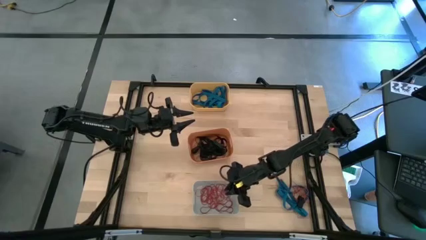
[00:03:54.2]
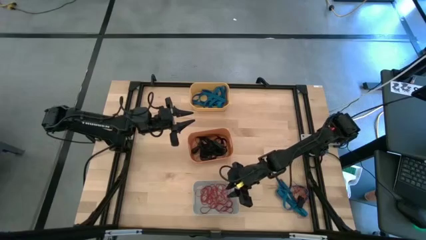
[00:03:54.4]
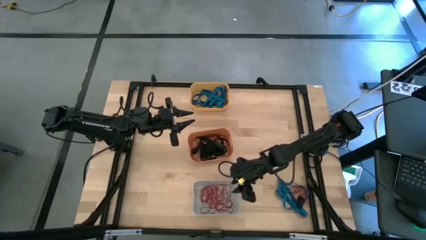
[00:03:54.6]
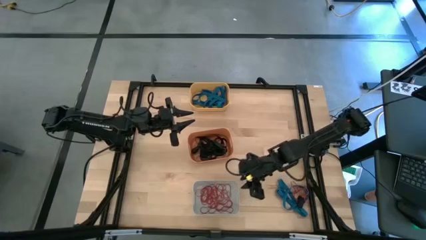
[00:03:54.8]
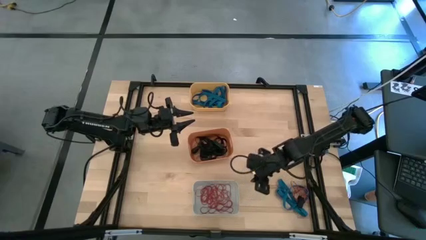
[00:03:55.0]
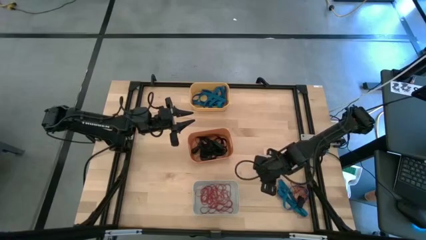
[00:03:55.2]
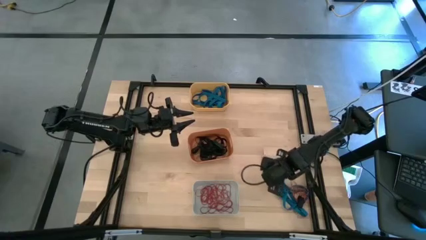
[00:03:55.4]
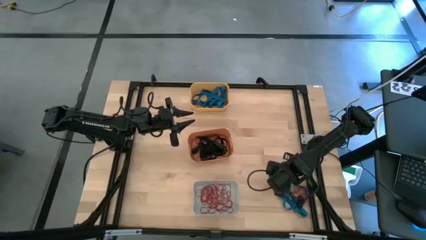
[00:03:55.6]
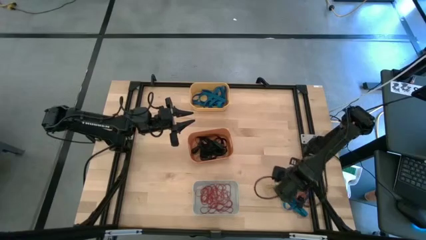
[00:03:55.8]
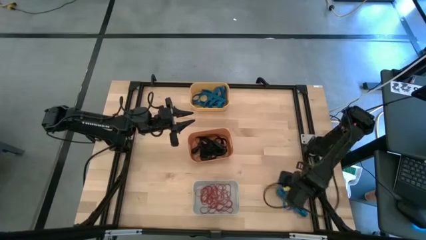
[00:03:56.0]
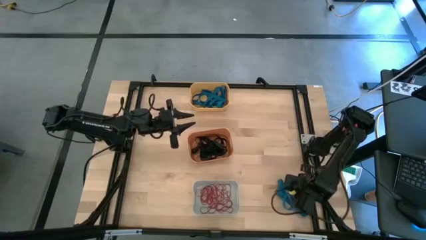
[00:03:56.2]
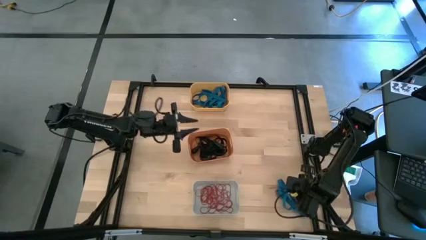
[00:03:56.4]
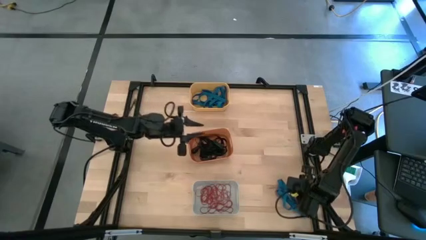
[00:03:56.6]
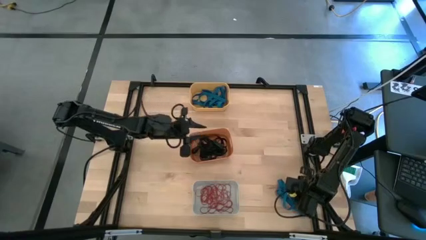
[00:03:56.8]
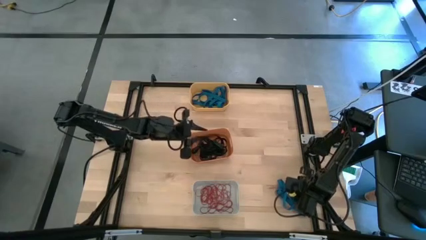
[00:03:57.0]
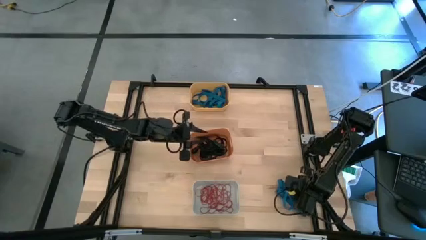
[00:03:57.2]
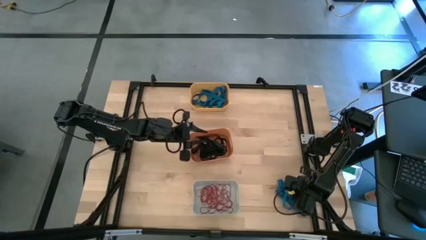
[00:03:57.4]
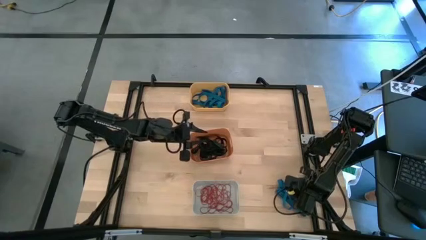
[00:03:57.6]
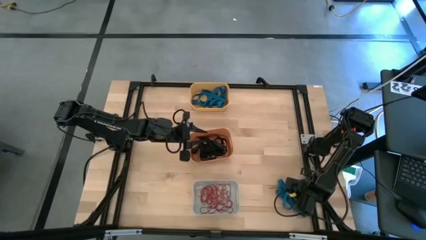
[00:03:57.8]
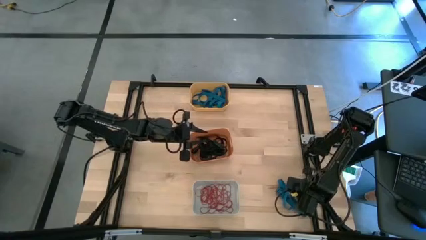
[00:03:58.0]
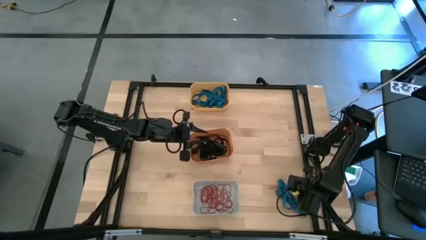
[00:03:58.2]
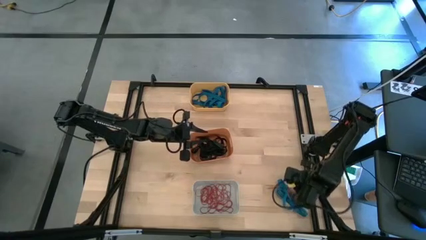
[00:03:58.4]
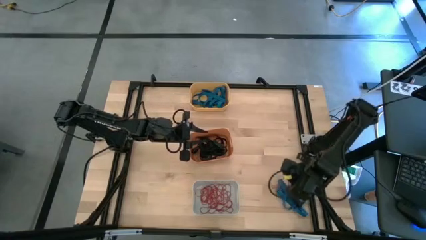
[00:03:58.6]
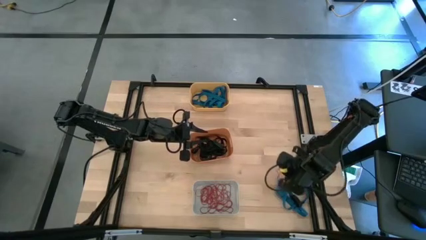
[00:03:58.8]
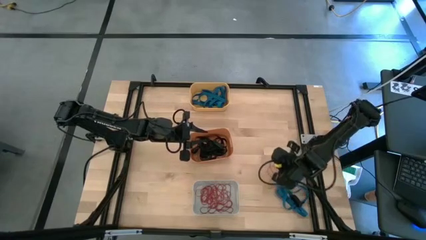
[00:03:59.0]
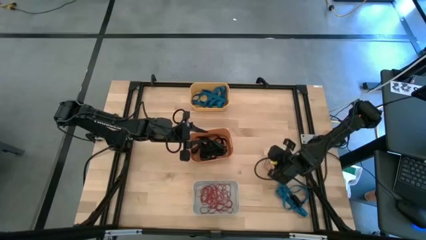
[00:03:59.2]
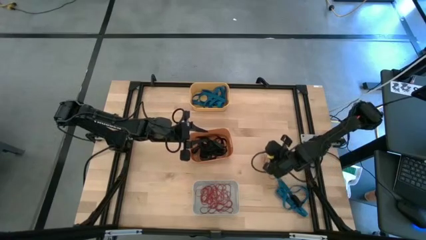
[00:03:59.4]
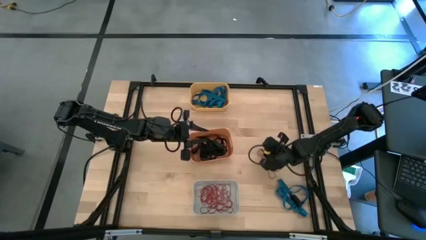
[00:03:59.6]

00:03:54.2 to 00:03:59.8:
Task: Sort rubber bands into baskets
Put the red rubber band in the white bin

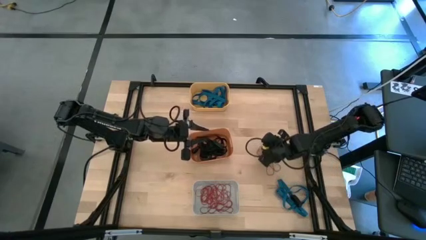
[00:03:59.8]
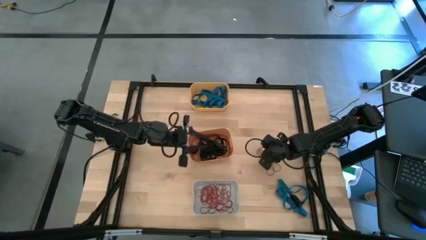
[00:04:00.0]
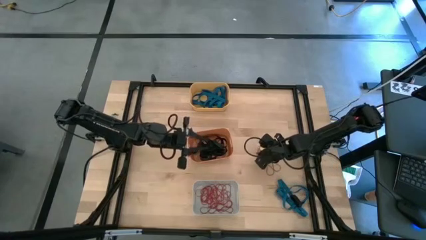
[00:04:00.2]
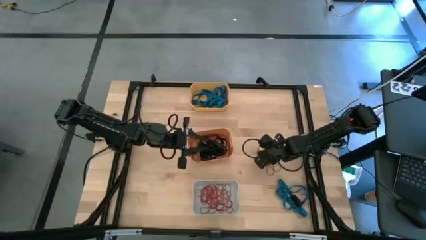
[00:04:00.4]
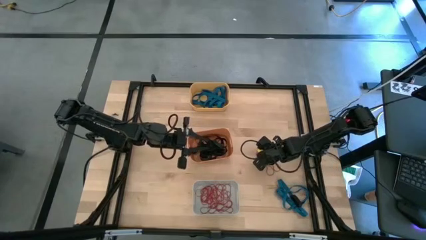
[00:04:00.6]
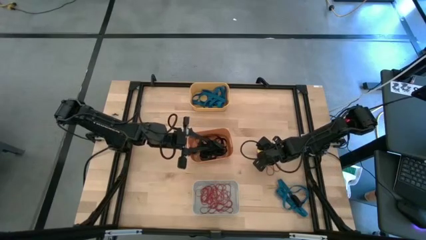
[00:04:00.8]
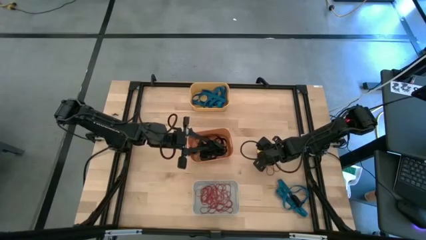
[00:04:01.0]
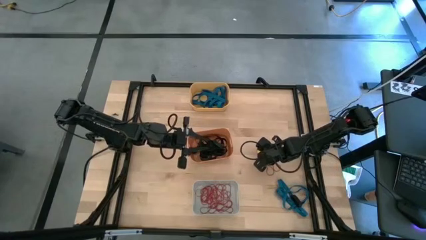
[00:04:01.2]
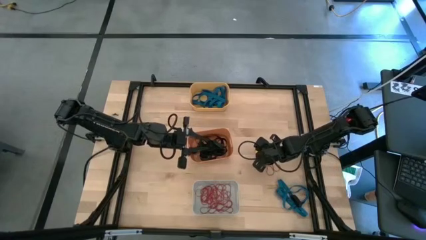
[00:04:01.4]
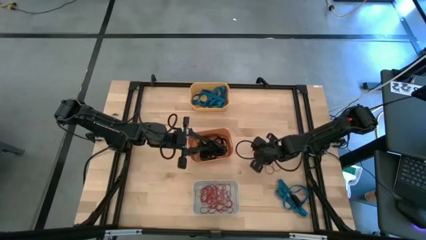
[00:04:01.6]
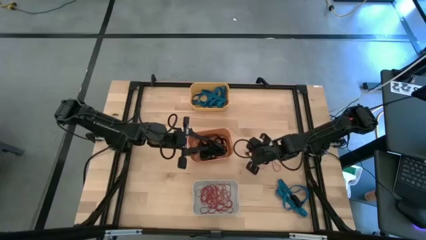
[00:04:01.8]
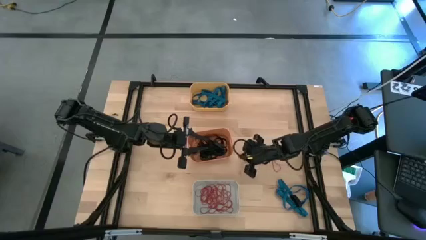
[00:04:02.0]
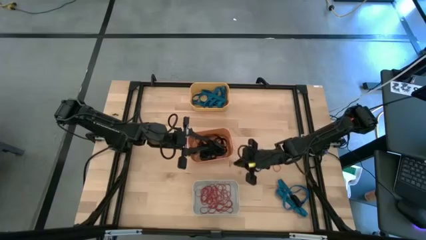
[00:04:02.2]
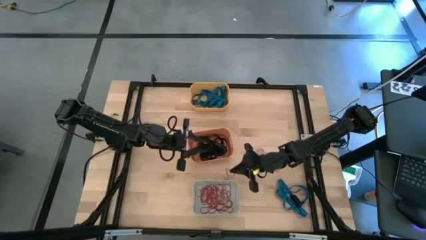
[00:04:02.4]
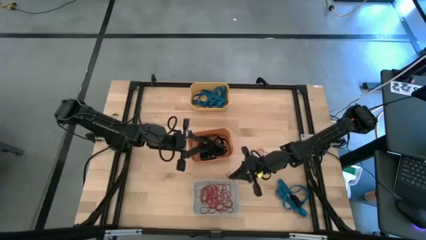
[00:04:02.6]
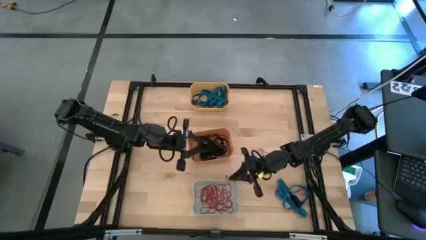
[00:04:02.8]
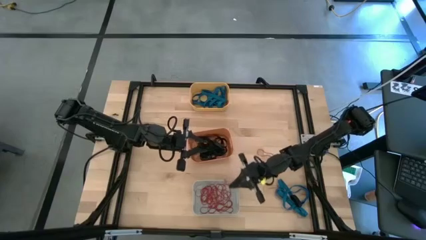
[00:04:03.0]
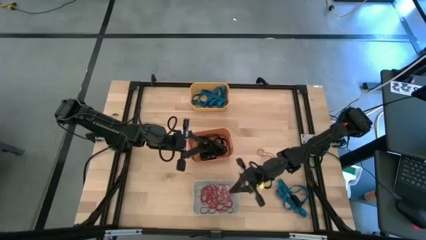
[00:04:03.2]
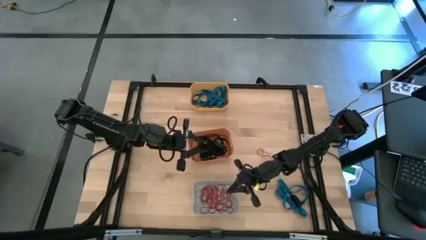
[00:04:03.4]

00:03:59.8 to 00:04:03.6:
Put the red rubber band in the white bin

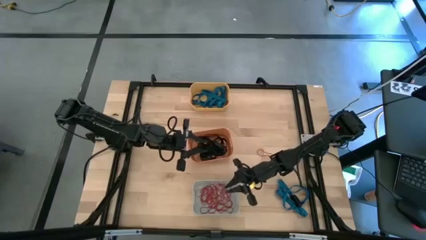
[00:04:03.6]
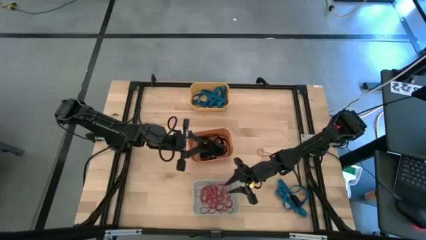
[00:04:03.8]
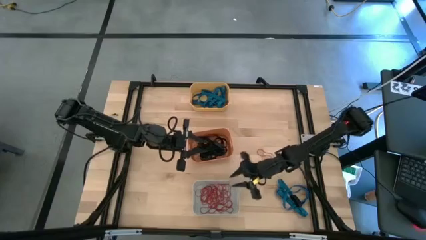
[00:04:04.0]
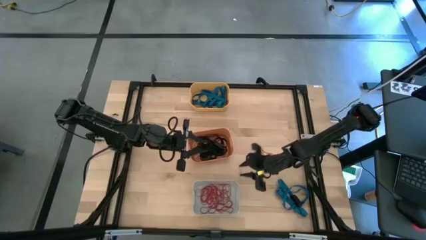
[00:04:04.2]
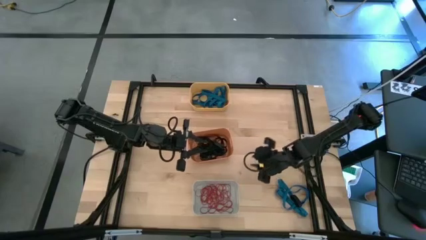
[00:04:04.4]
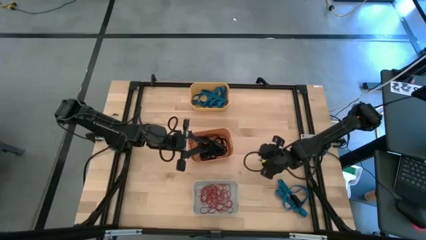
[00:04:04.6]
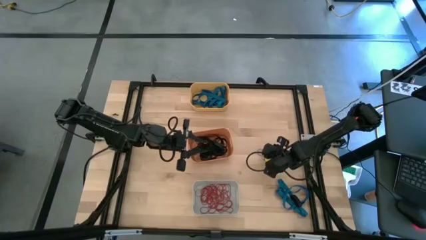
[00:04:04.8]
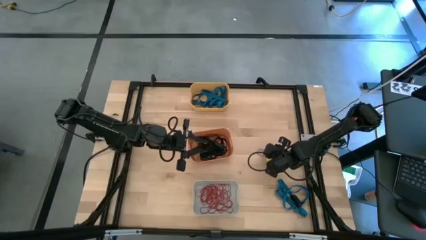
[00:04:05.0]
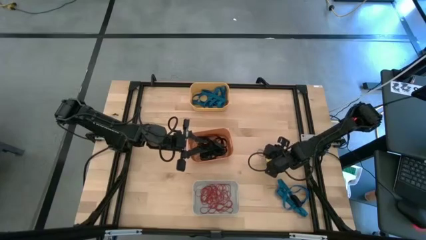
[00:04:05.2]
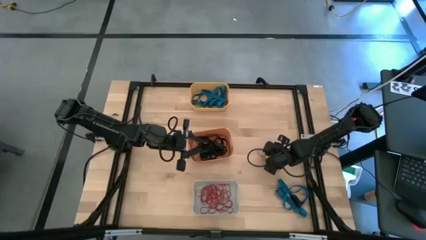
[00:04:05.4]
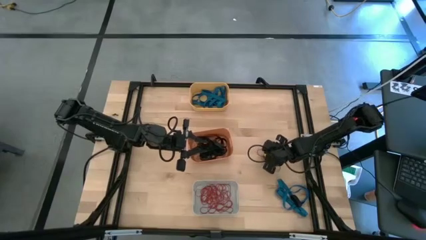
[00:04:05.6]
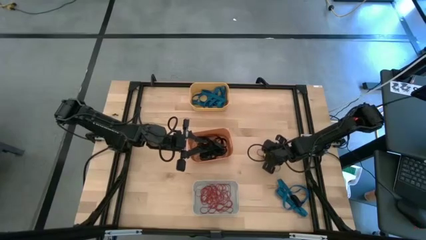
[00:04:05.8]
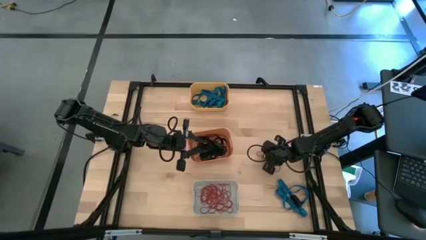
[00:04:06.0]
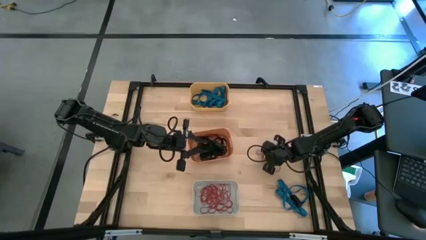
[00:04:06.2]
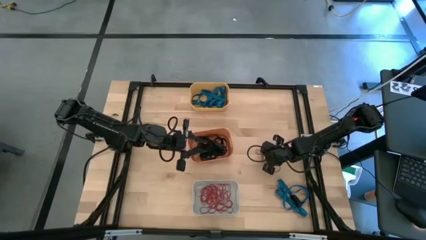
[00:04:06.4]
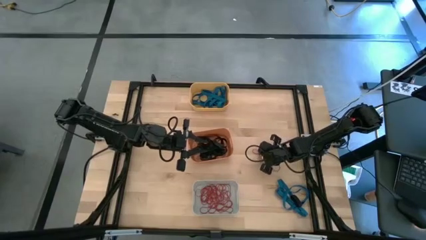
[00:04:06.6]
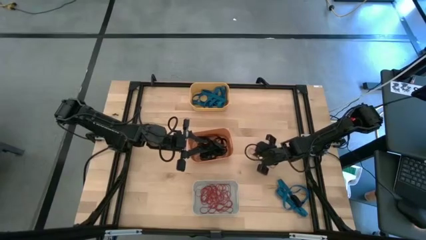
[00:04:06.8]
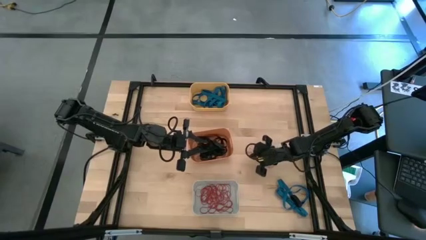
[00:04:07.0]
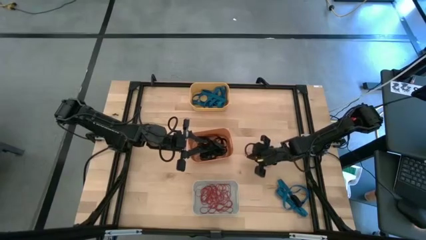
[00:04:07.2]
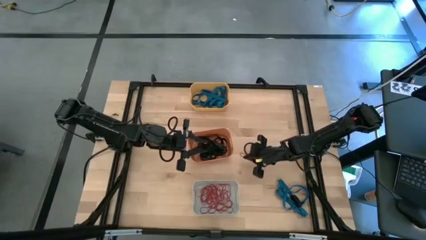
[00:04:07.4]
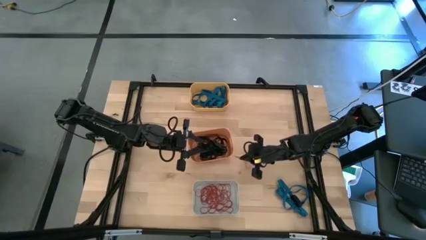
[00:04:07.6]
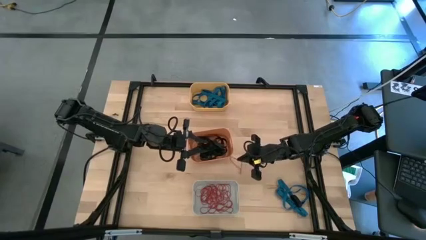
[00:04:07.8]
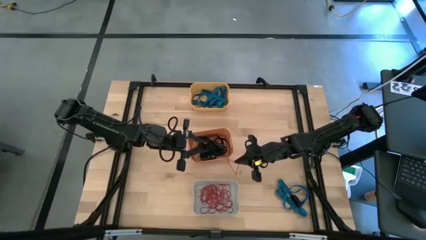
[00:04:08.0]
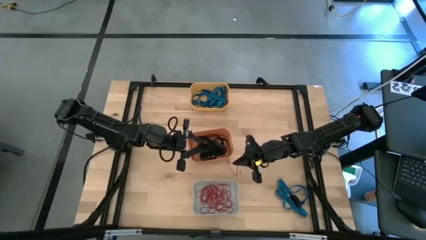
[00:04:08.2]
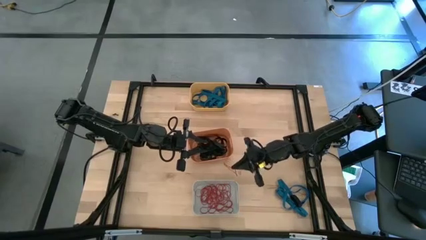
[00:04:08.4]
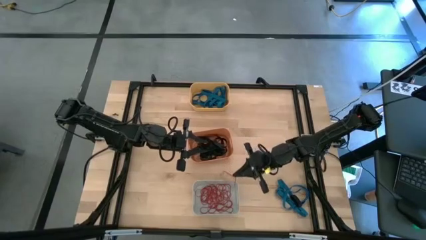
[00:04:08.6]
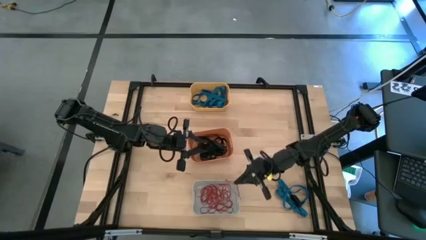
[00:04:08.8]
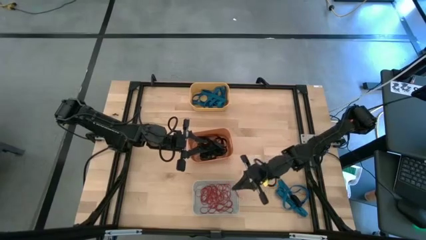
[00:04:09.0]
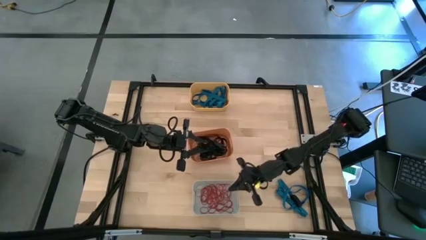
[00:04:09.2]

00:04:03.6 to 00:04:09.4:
Put the red rubber band in the white bin
